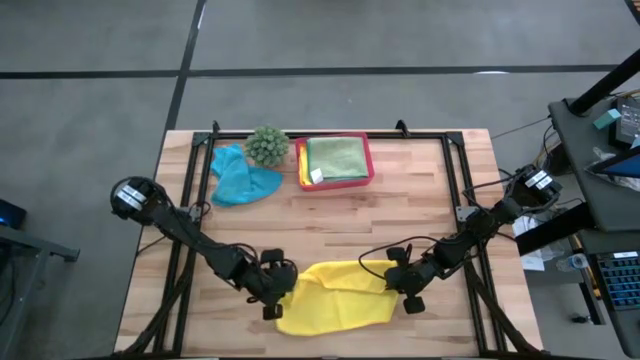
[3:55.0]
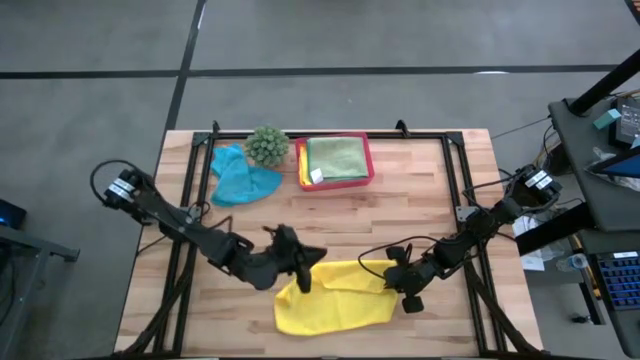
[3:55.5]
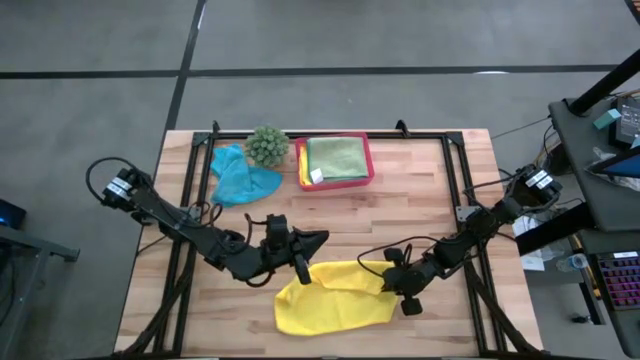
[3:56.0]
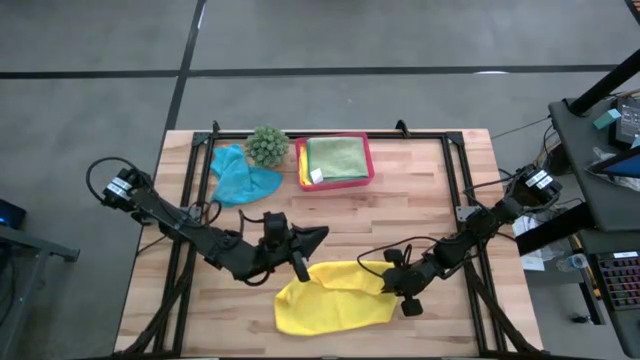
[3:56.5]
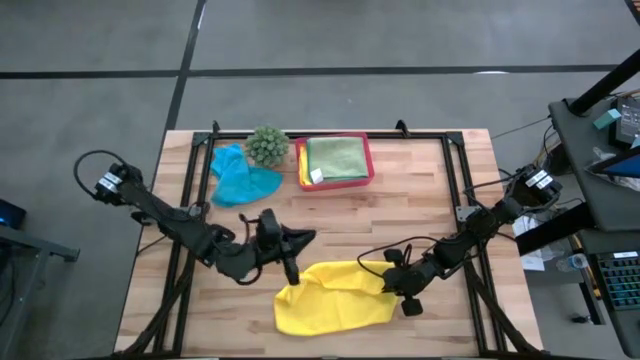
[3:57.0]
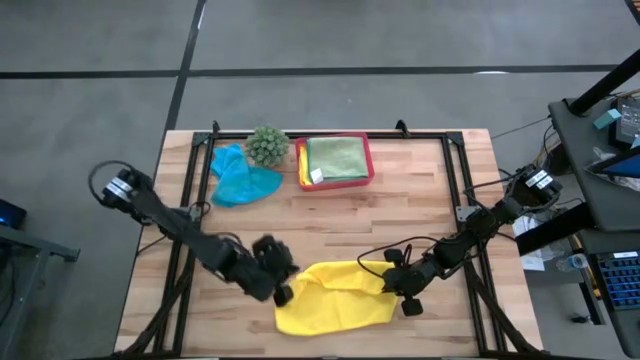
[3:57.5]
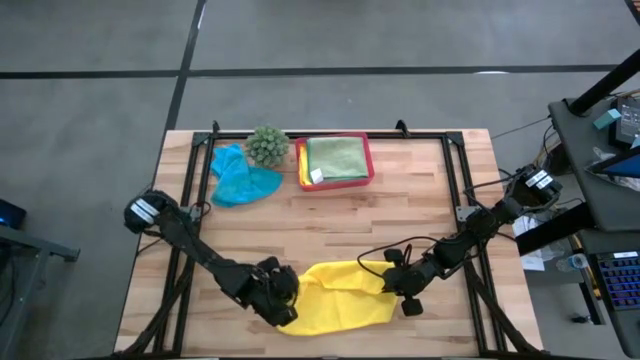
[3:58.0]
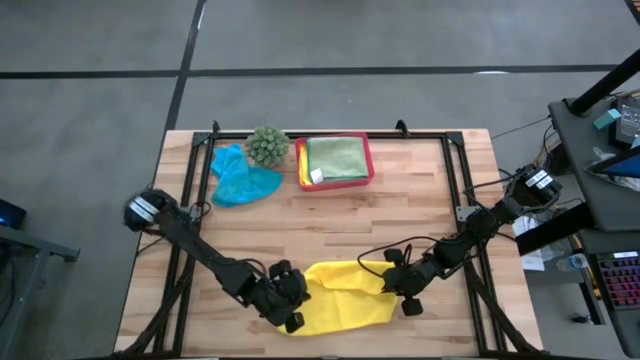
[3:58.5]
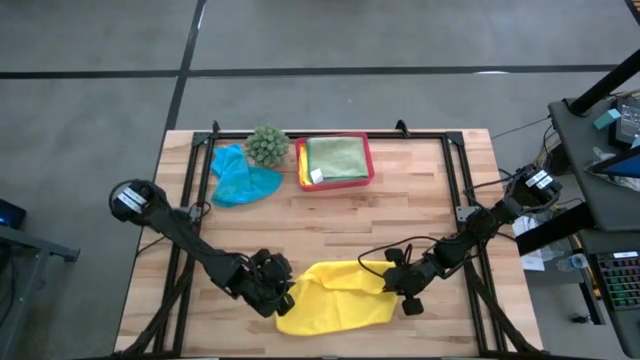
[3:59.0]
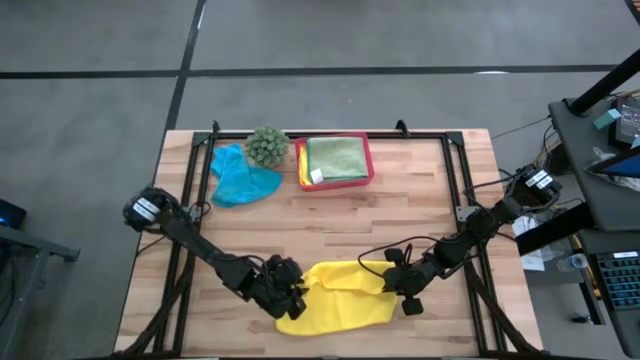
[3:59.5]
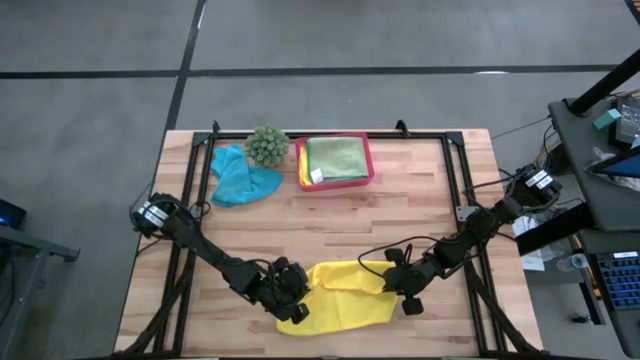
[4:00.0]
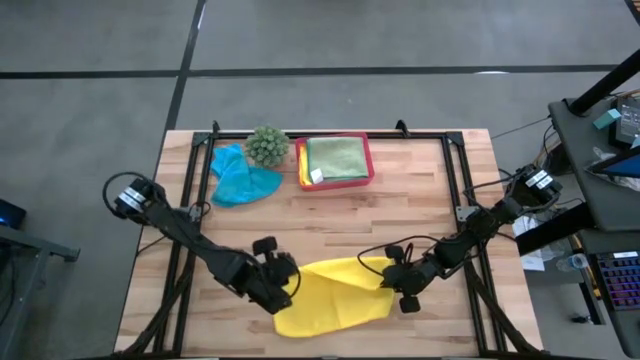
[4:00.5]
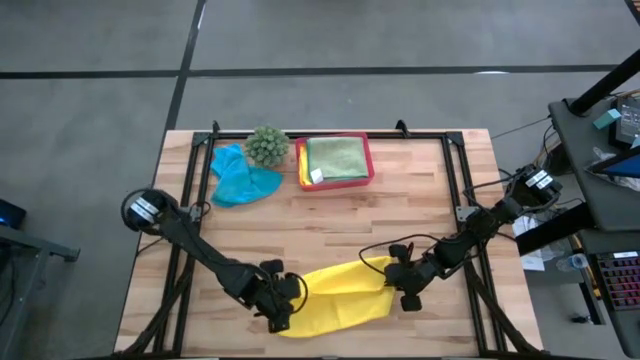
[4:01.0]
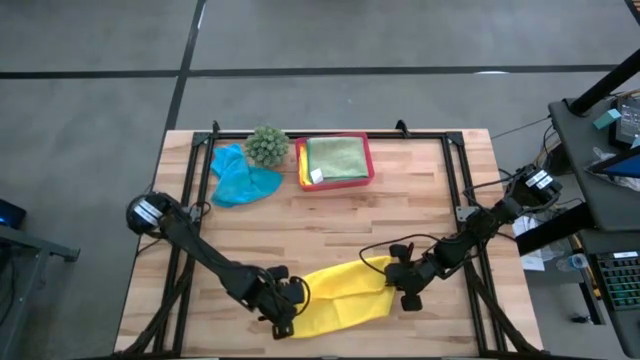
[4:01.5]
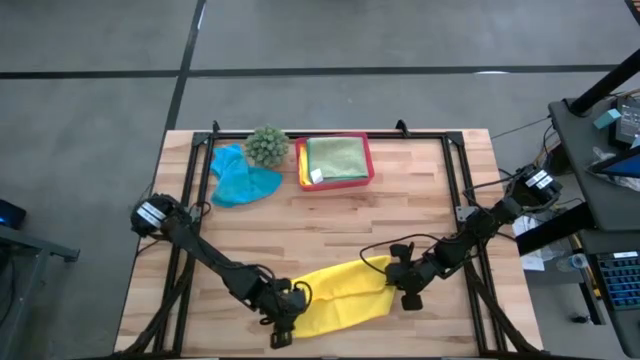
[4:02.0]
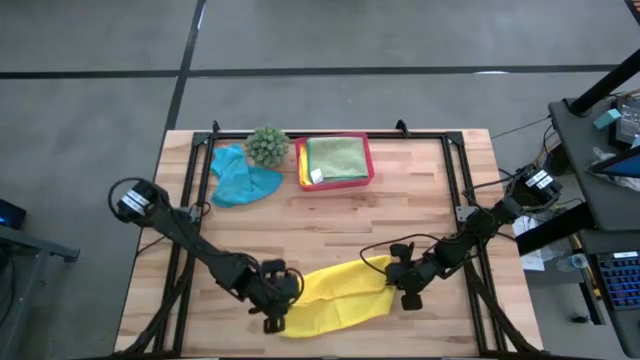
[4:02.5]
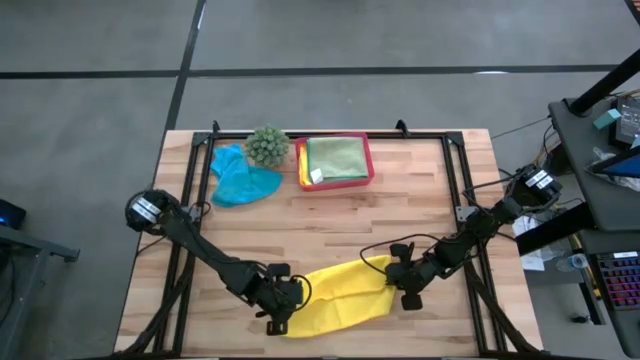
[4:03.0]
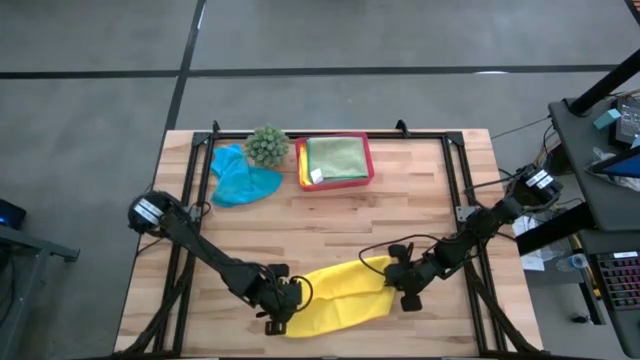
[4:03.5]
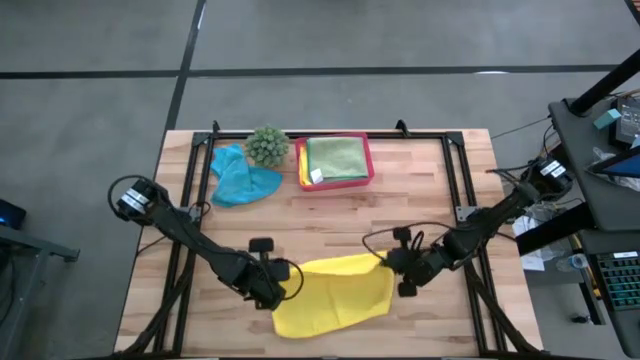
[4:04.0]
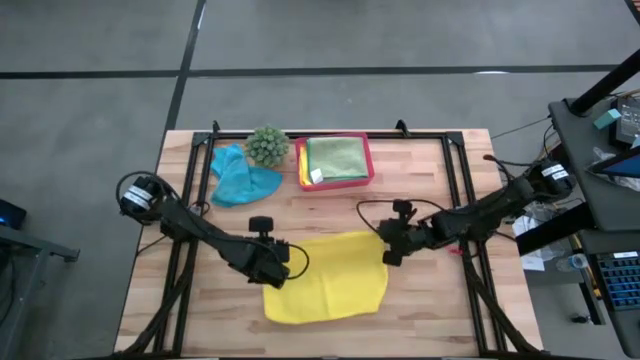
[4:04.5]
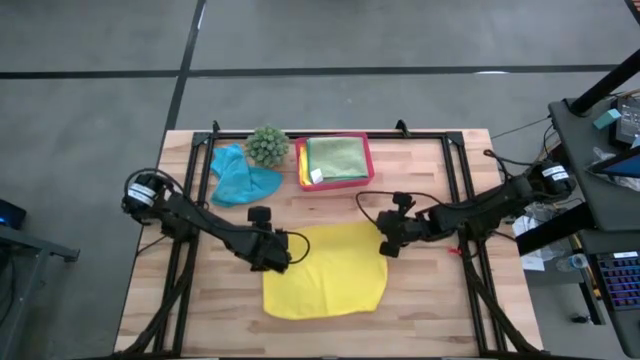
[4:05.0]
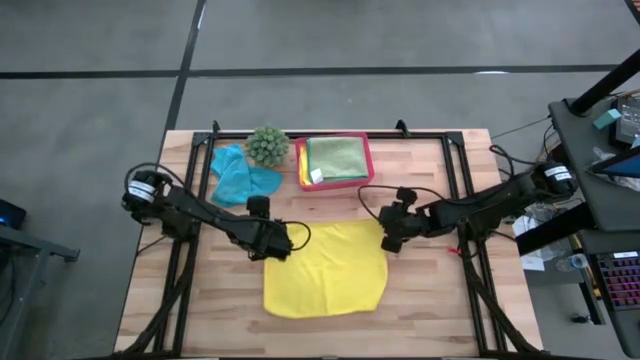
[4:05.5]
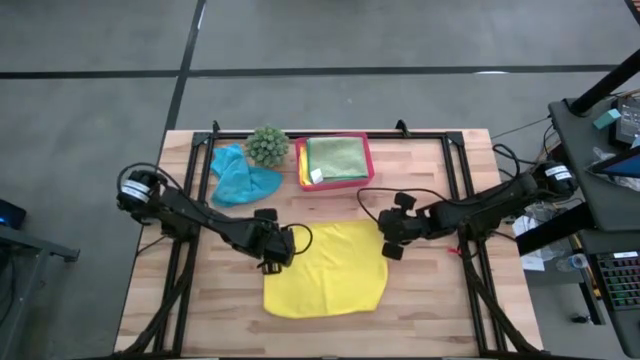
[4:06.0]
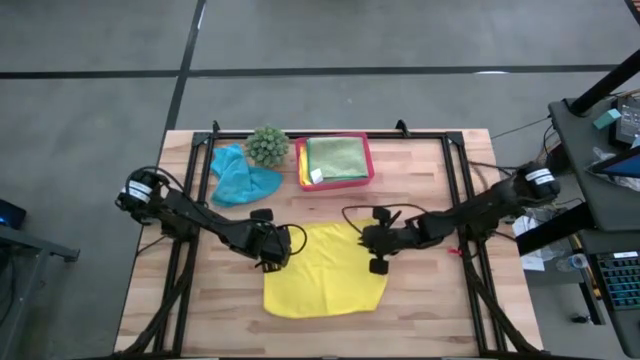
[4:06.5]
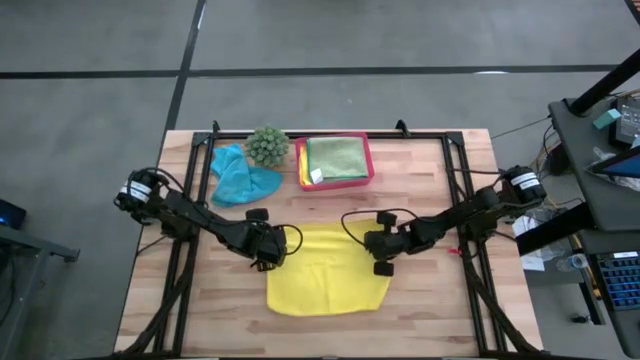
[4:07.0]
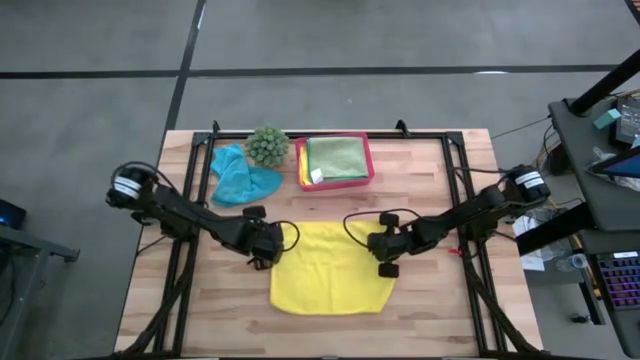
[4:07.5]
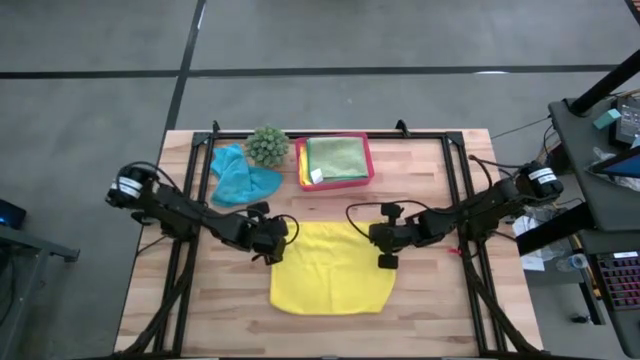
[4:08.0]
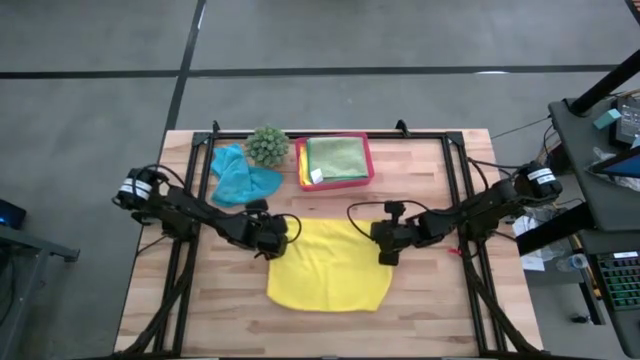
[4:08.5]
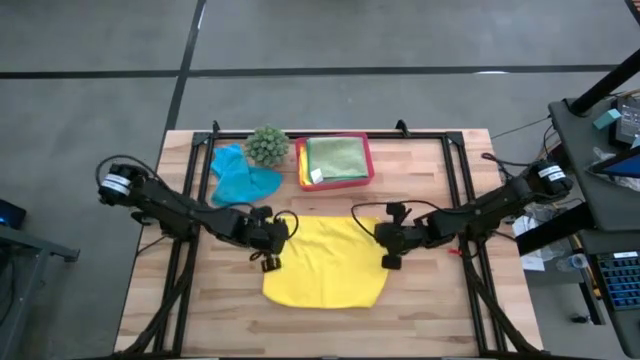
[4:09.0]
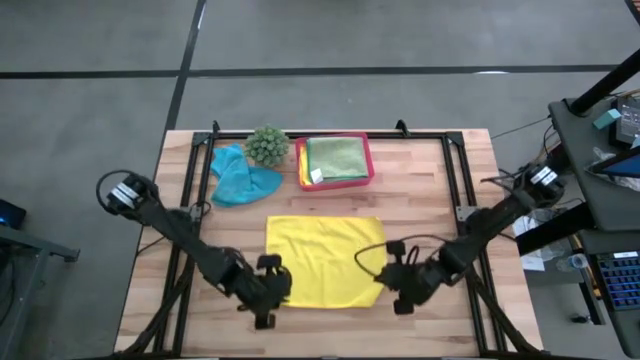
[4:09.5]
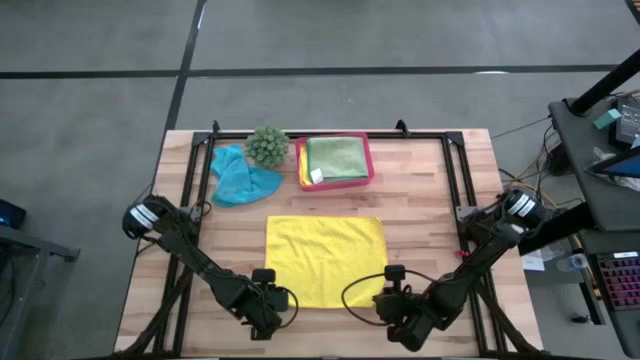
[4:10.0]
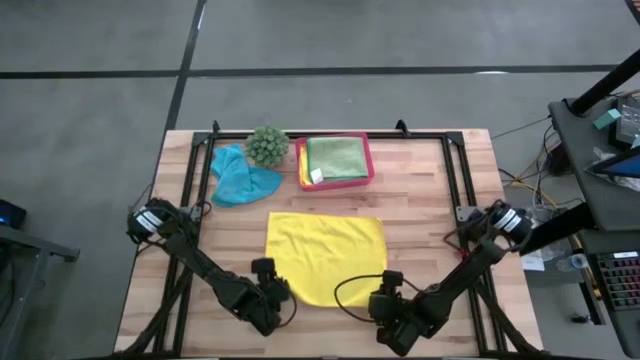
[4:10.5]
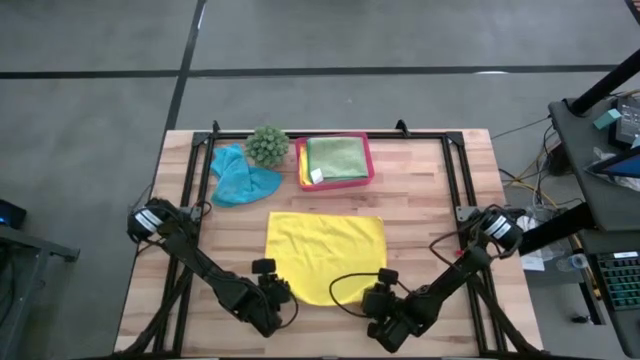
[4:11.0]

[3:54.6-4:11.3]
Task: Fold microfiber towels
Fold the yellow microfiber towel

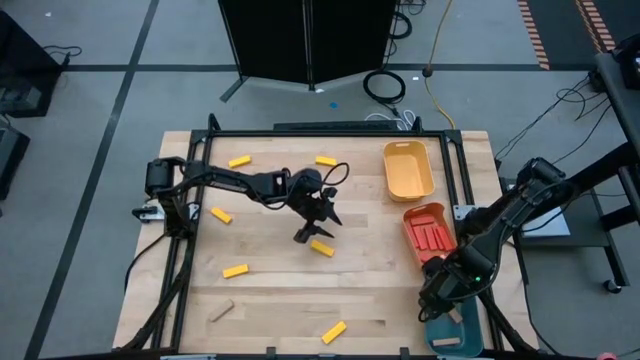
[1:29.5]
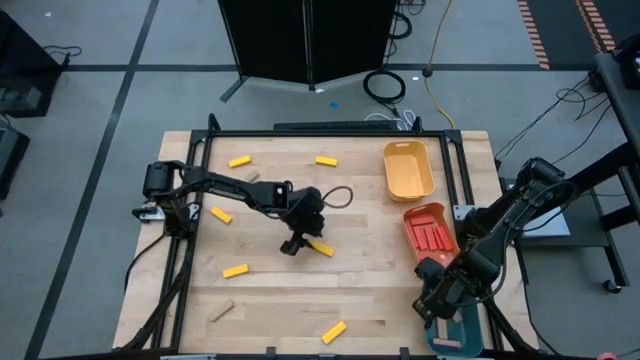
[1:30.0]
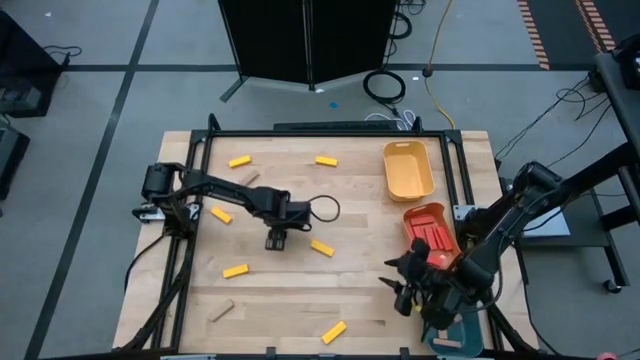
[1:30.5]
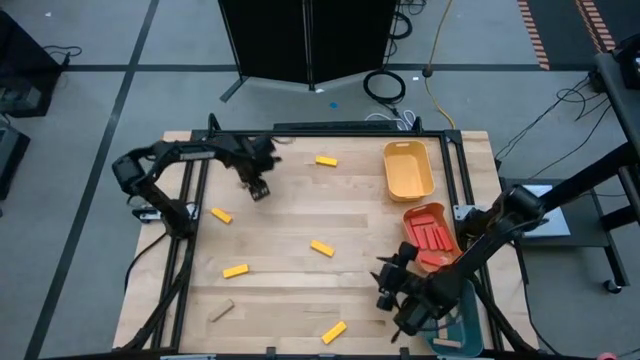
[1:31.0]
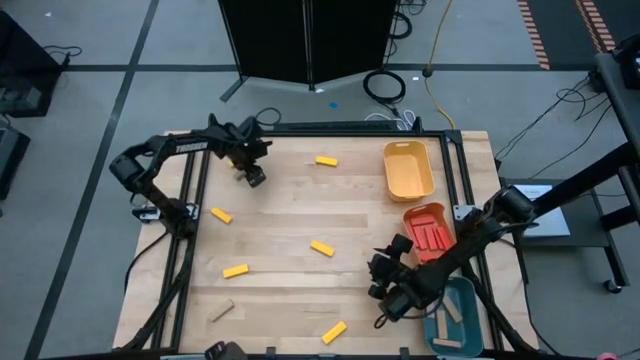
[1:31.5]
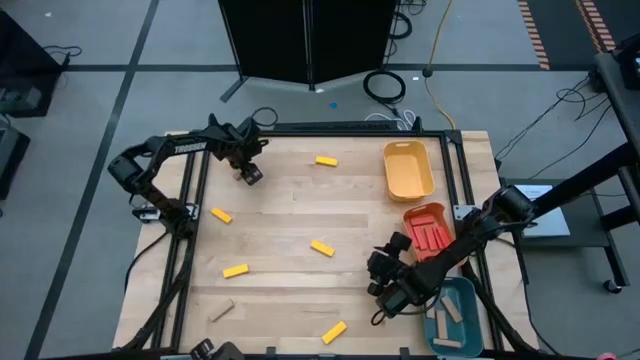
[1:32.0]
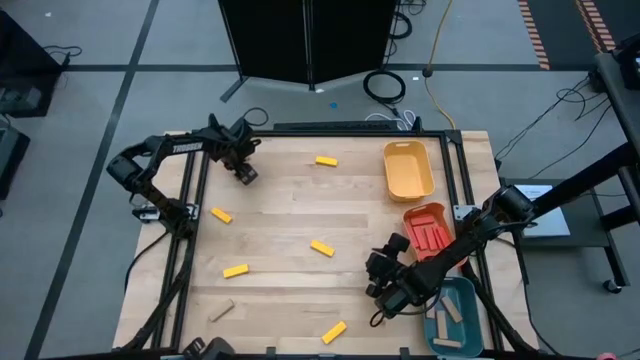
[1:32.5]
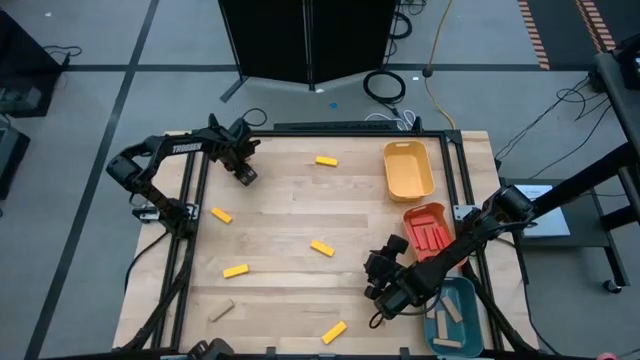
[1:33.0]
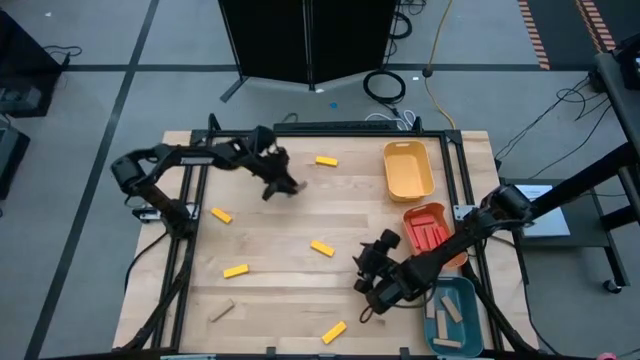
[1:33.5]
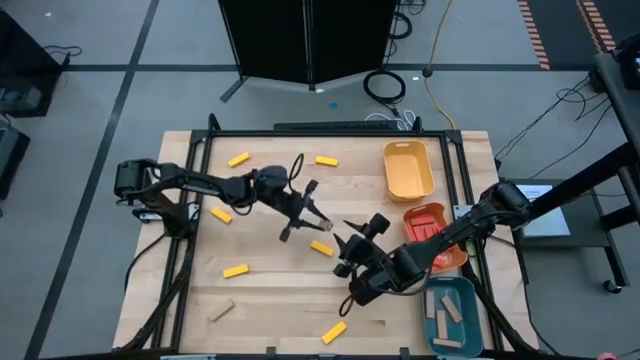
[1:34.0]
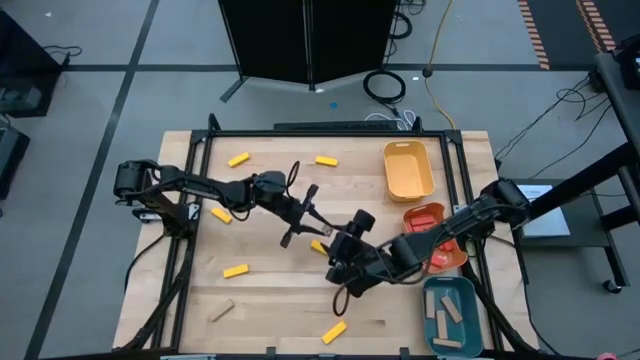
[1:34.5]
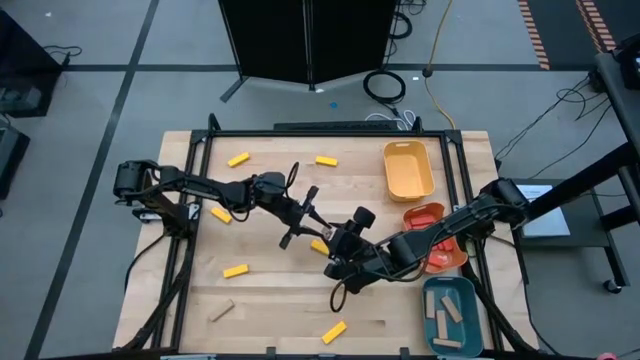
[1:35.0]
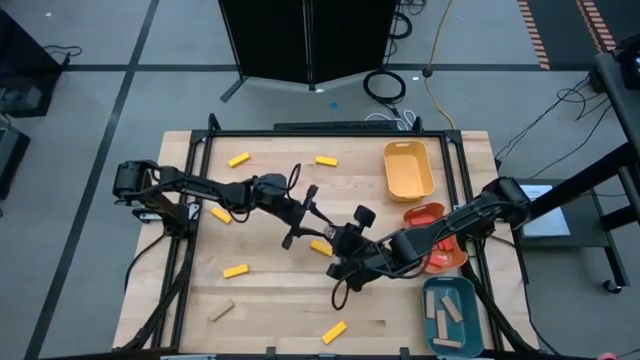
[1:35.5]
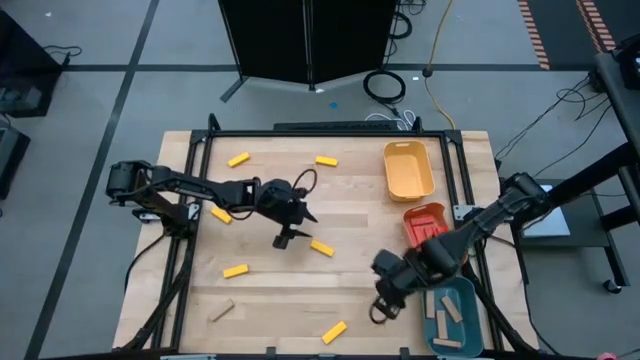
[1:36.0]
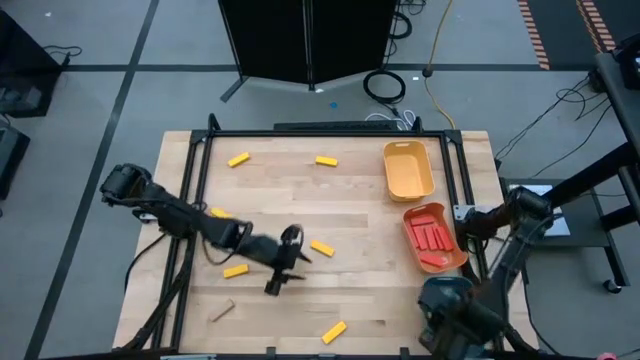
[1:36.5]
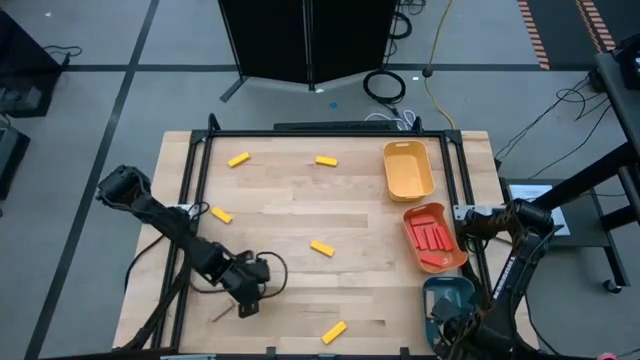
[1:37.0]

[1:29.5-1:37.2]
Task: Sort blocks
Put the brown block into the blue bin
